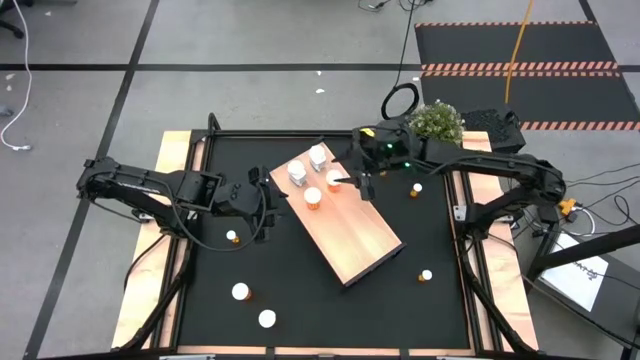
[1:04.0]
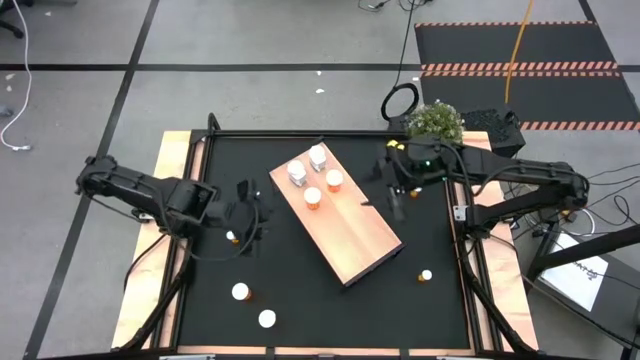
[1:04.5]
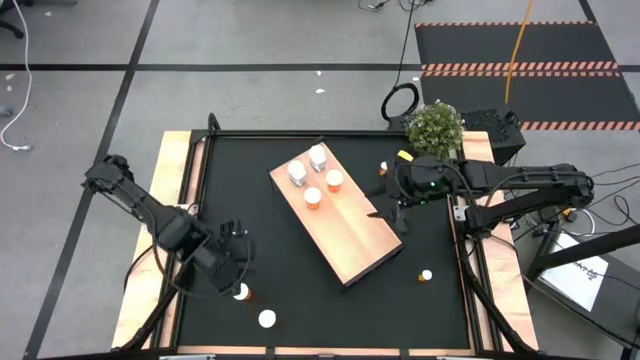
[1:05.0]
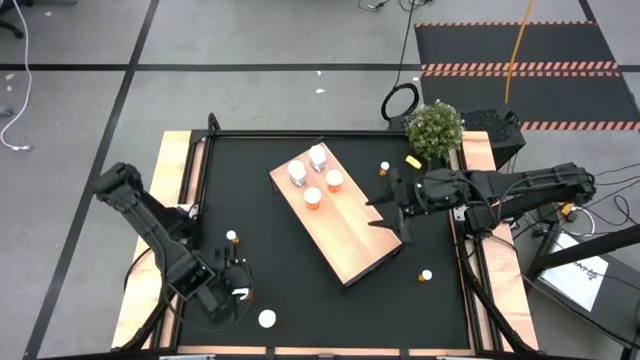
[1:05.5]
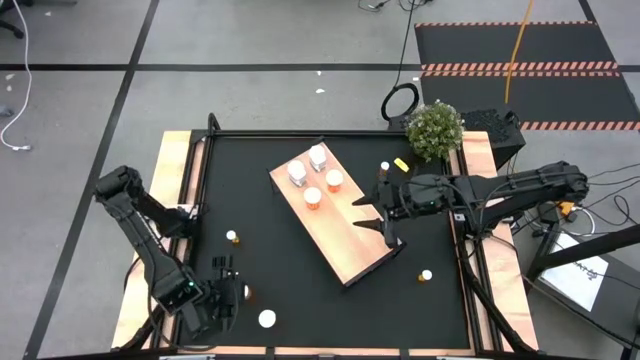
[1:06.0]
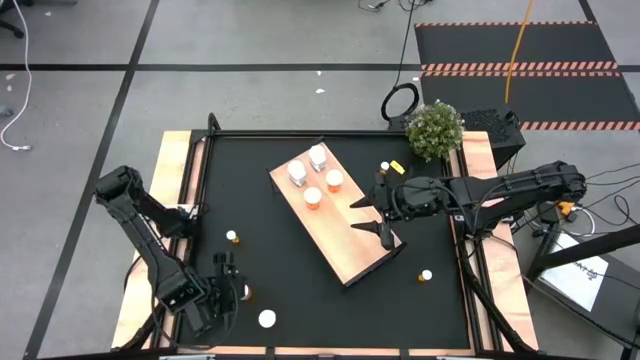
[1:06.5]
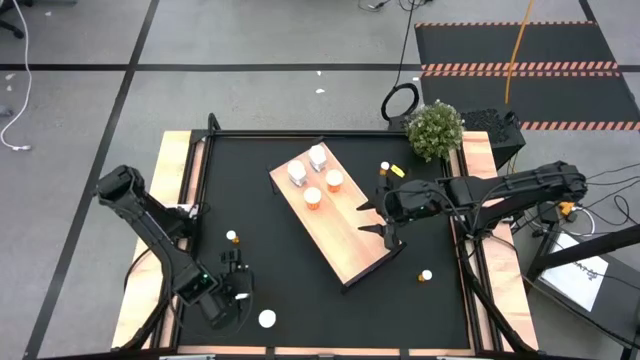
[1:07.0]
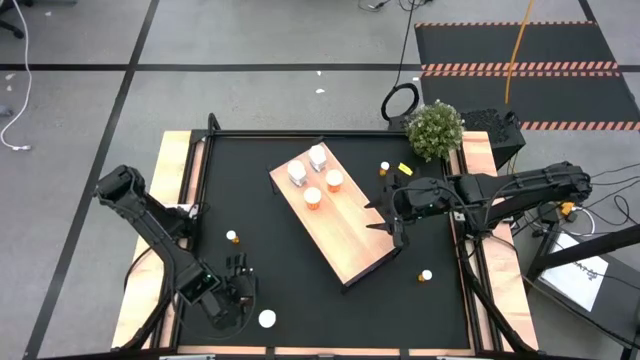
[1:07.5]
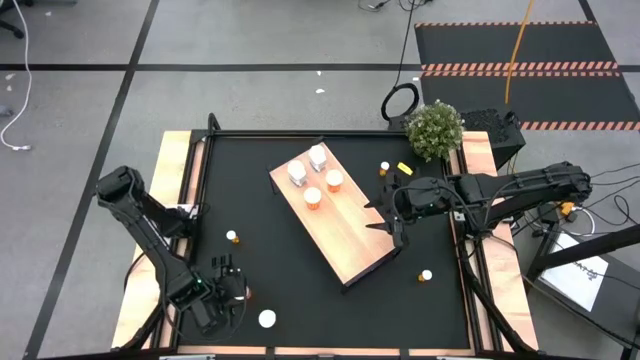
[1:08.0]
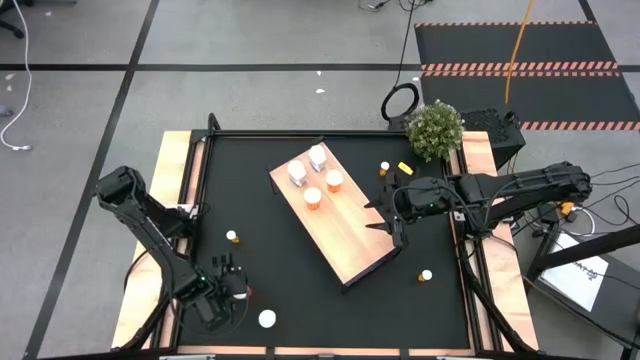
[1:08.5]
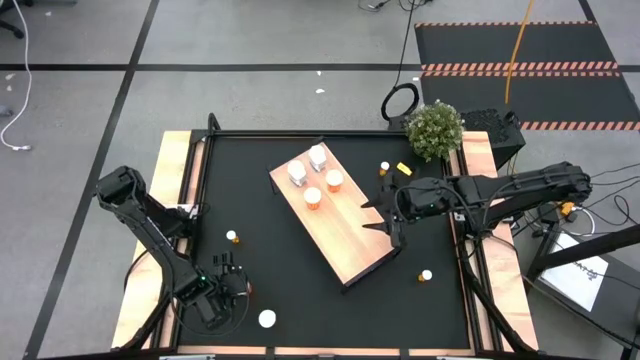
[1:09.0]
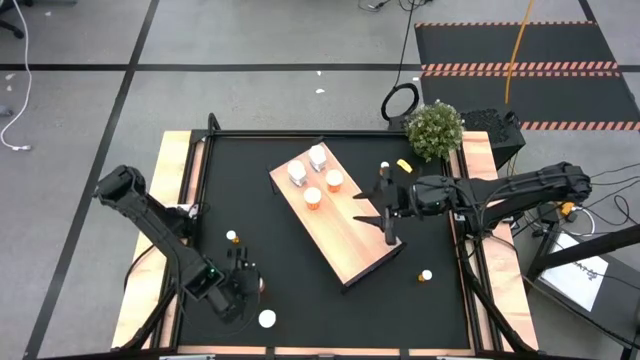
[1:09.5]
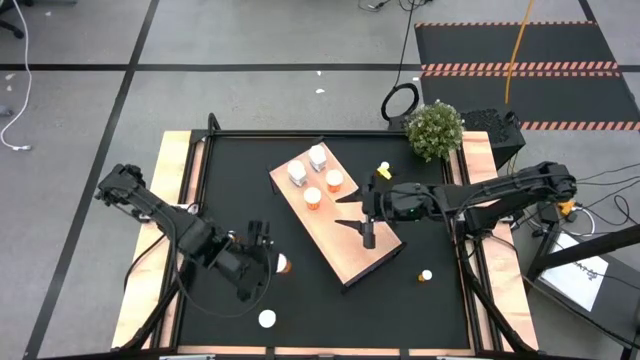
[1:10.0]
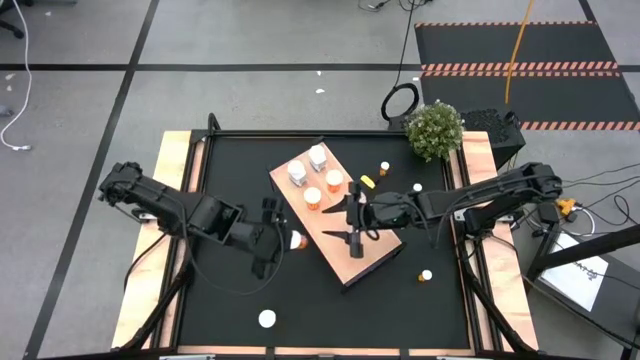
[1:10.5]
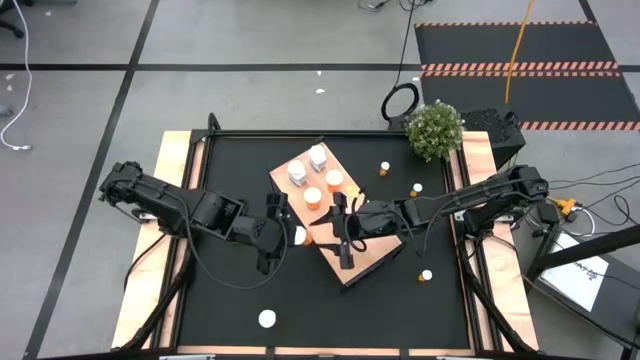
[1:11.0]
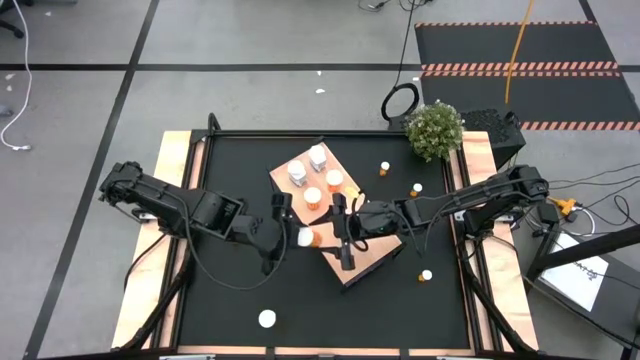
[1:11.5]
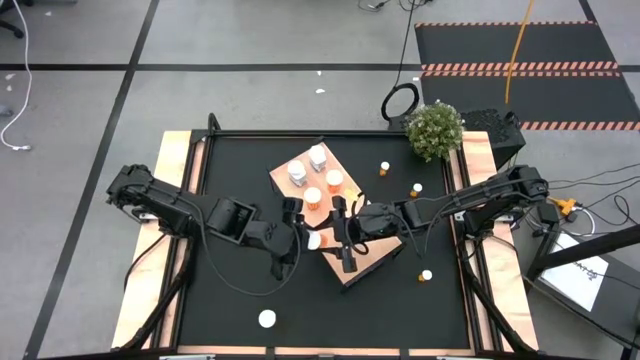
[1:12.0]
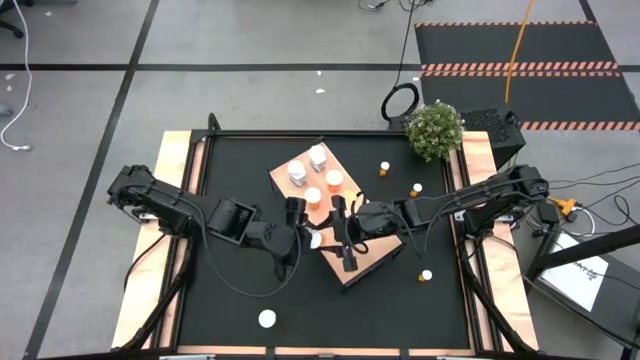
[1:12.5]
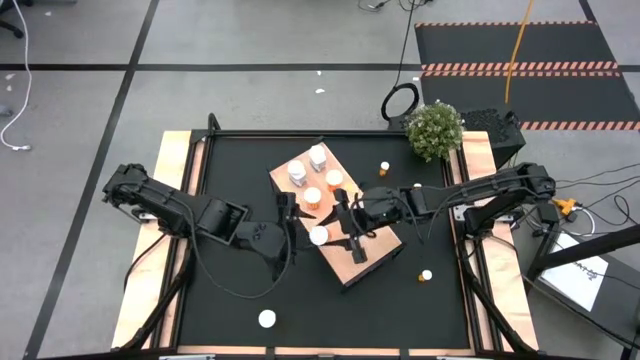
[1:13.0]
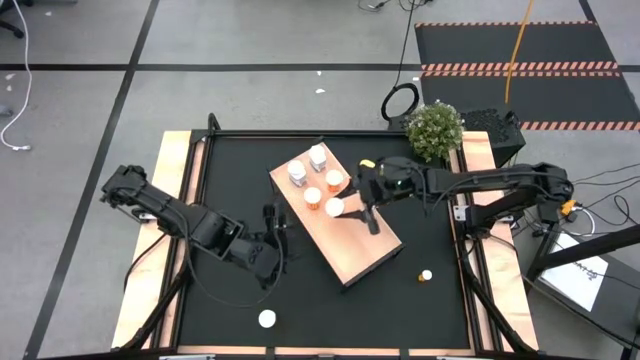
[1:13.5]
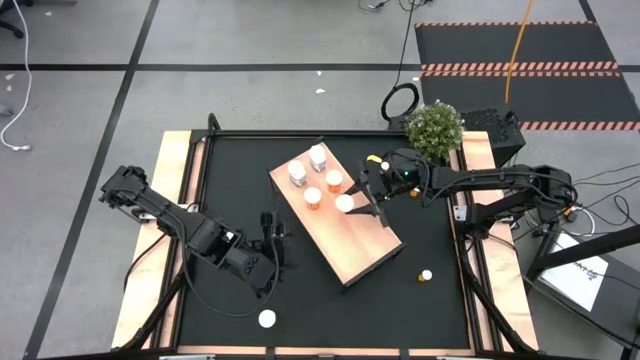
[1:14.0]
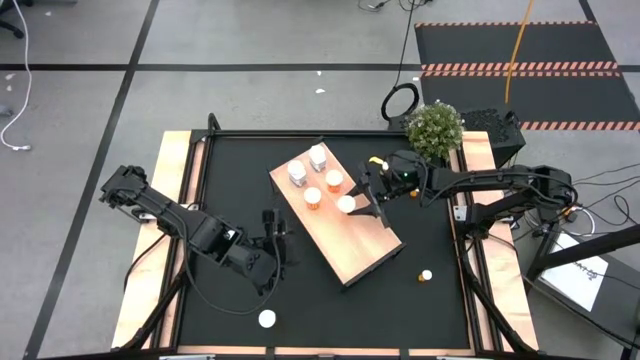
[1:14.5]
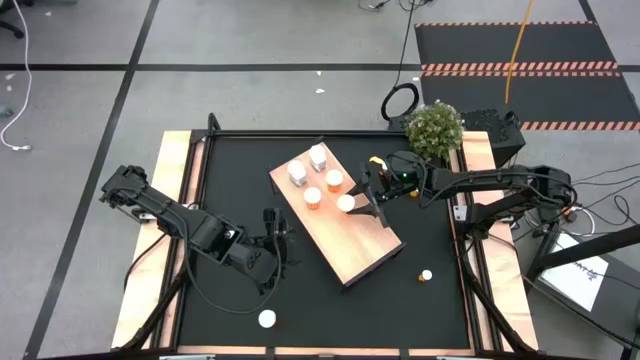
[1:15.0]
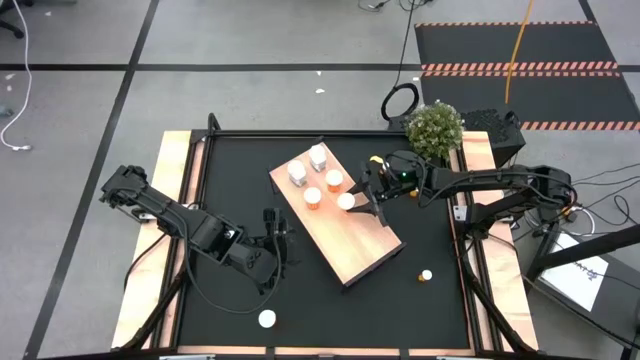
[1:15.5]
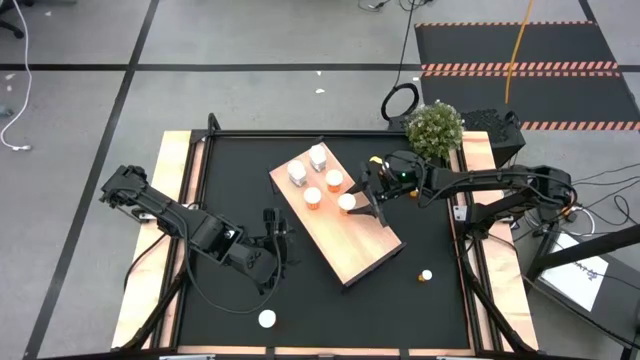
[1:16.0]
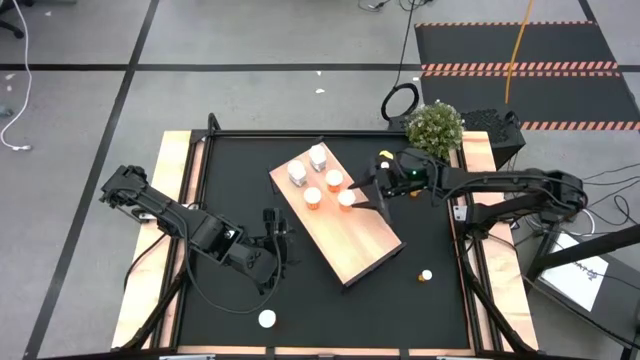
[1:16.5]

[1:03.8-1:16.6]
Task: Pick and place medicine bottles onto shelf by color
Put the top orange capsule bottle on the shelf aligned with the orange capsule bottles

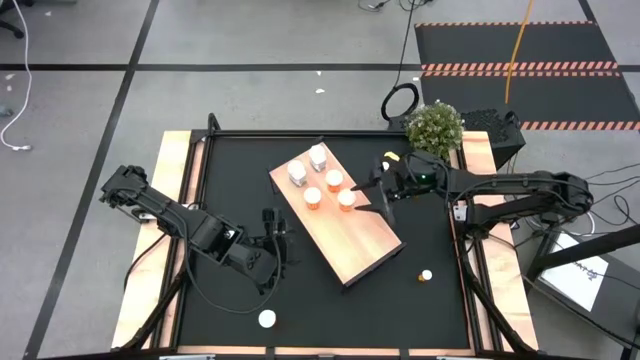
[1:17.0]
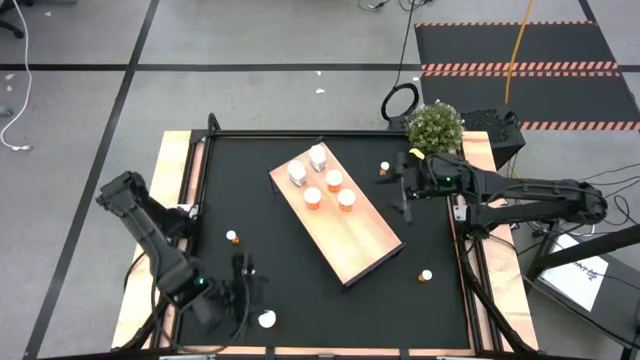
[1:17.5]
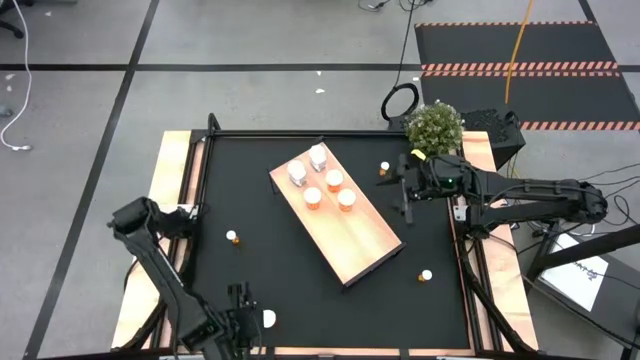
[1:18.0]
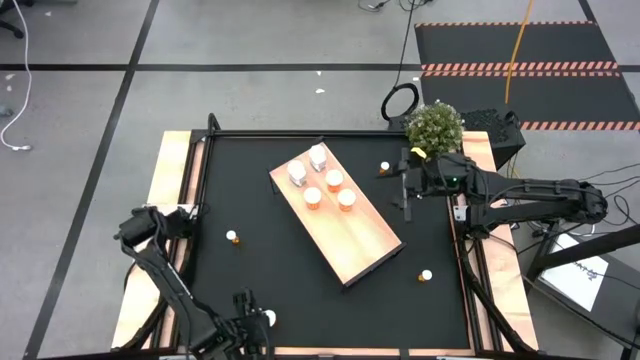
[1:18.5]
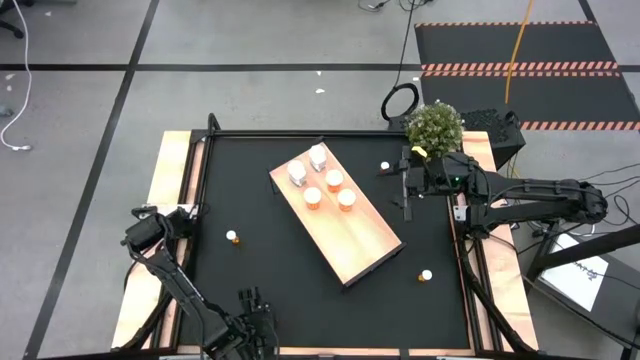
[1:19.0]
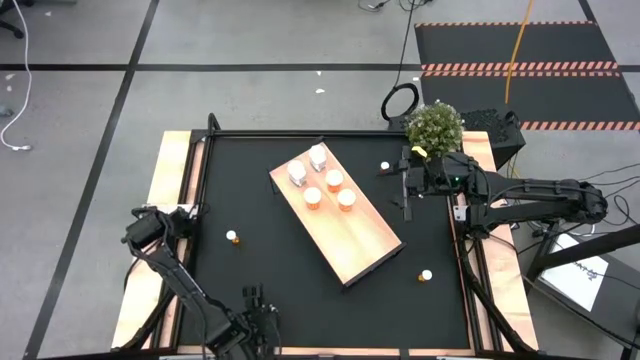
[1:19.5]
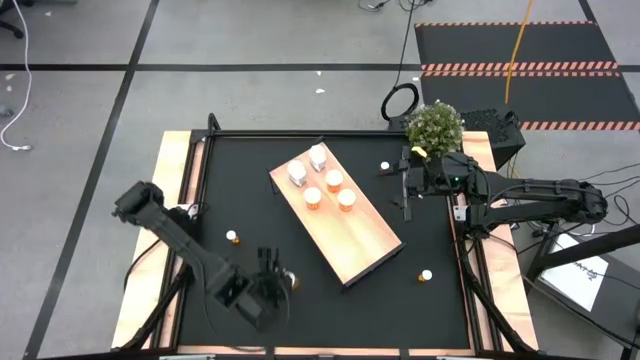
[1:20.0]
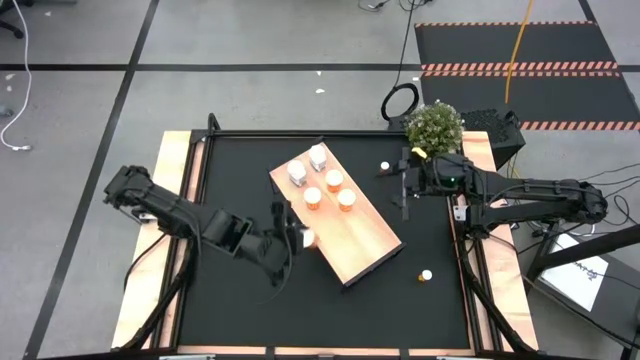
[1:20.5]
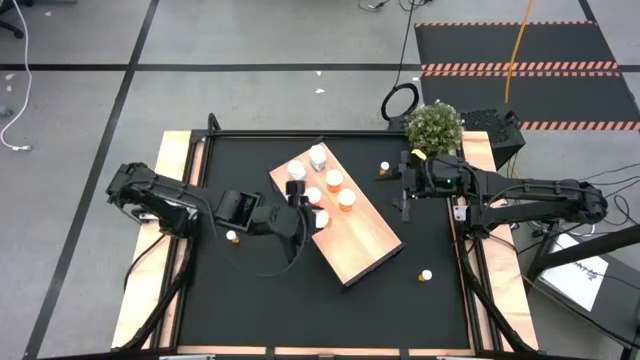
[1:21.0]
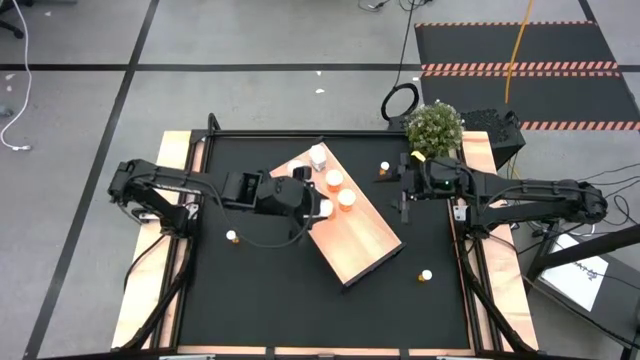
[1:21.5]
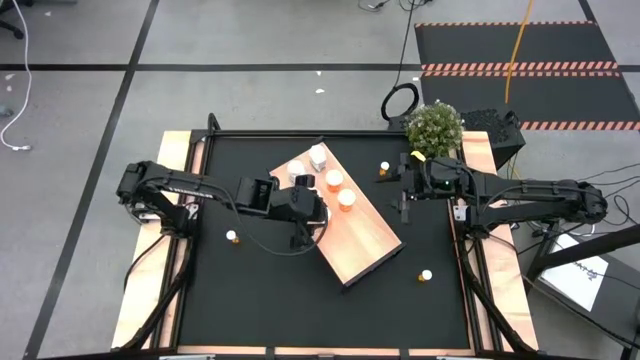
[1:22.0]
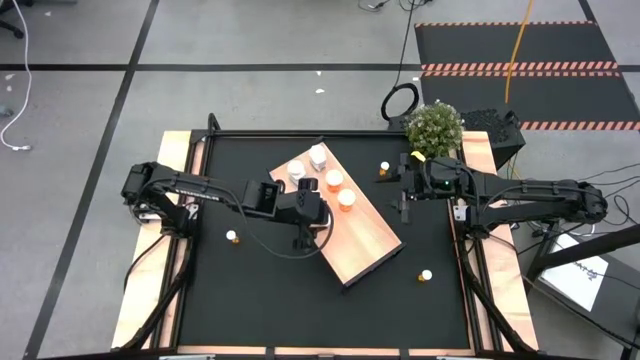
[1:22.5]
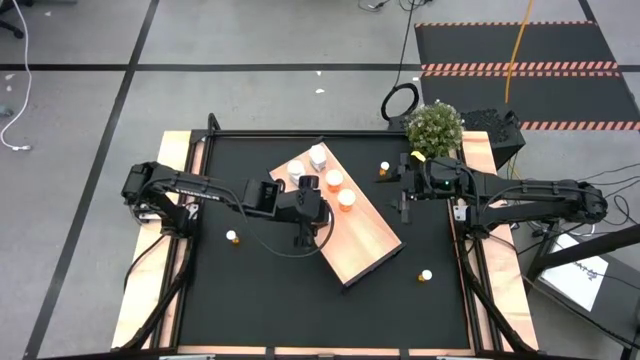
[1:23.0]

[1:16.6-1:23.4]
Put the orange capsule bottle on the shelf aligned with the other capsule bottles

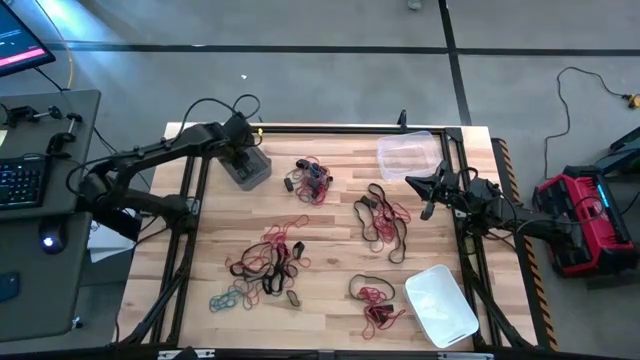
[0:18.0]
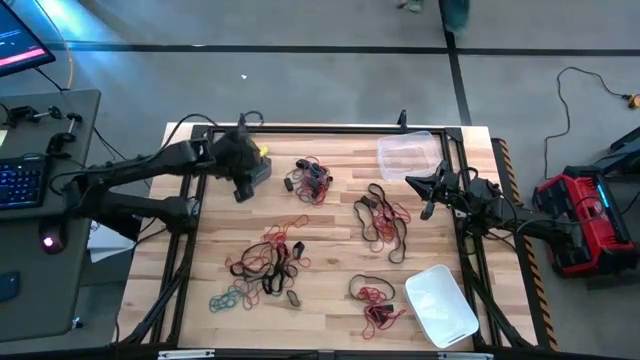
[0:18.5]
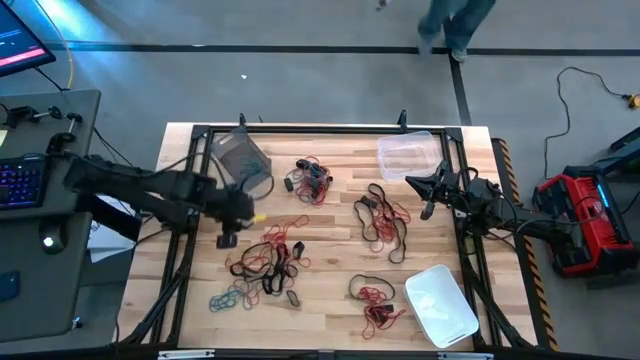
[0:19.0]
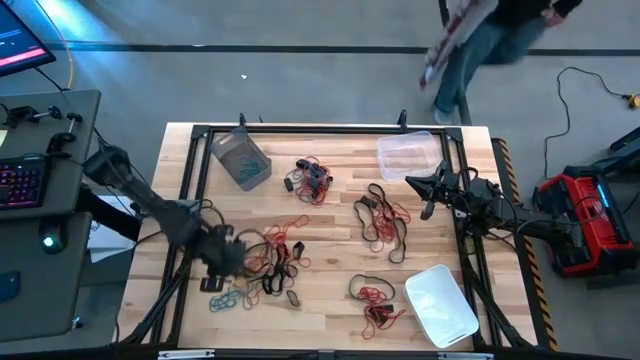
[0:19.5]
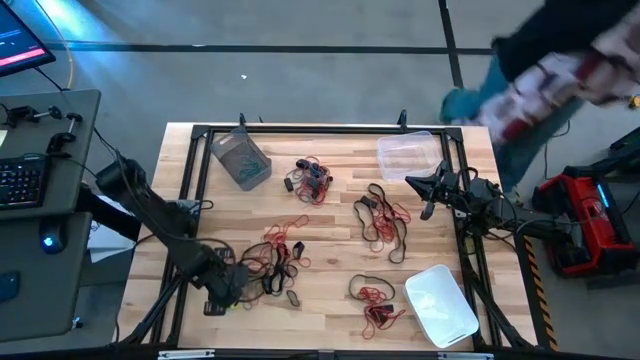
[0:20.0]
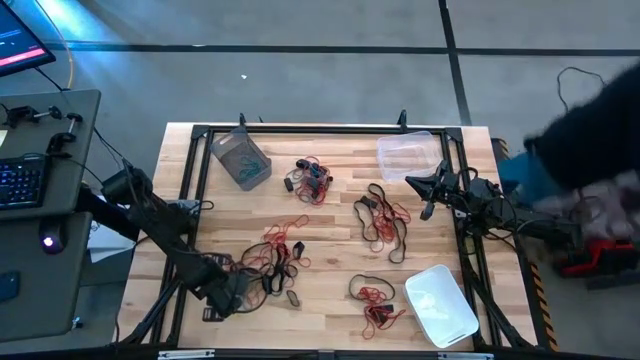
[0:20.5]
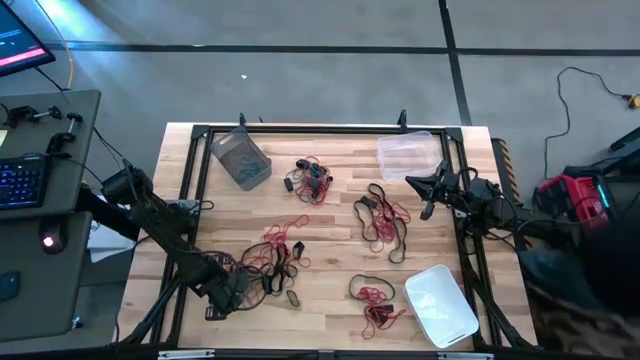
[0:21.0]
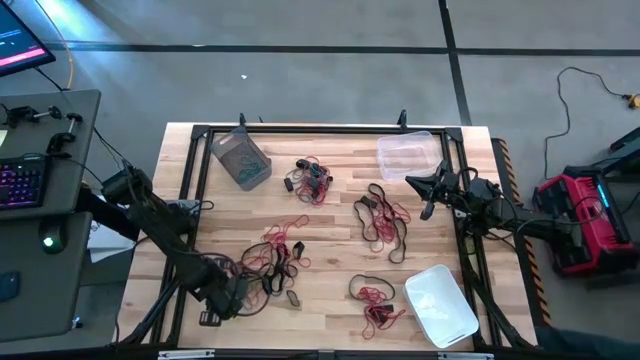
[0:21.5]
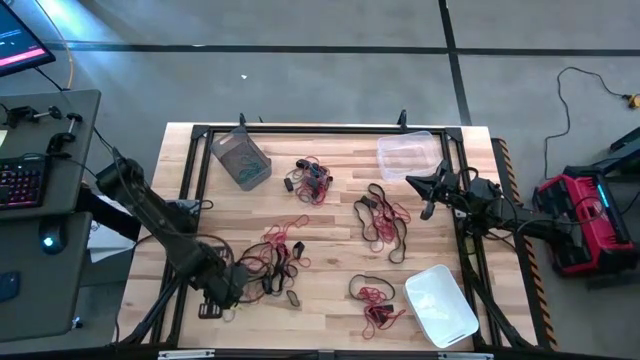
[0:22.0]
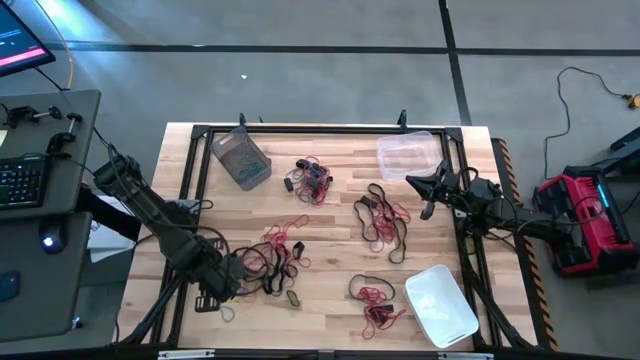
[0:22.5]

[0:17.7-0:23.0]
Task: Sort rubber bands into baskets
Put the blue rubber band into the black bin
